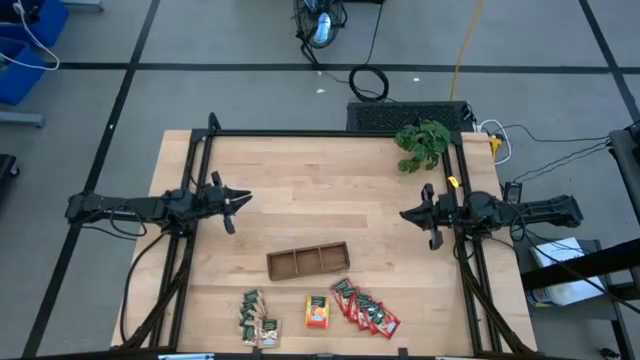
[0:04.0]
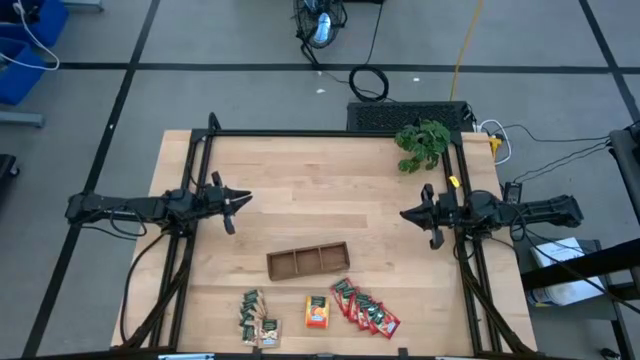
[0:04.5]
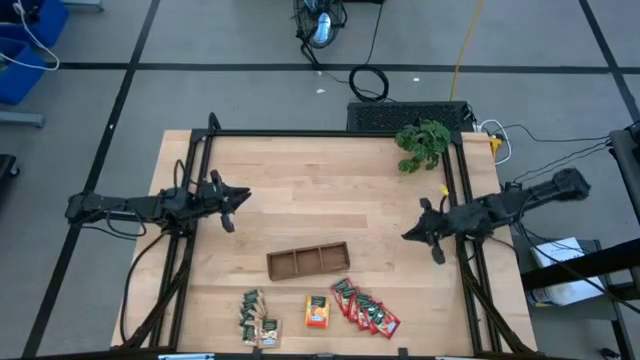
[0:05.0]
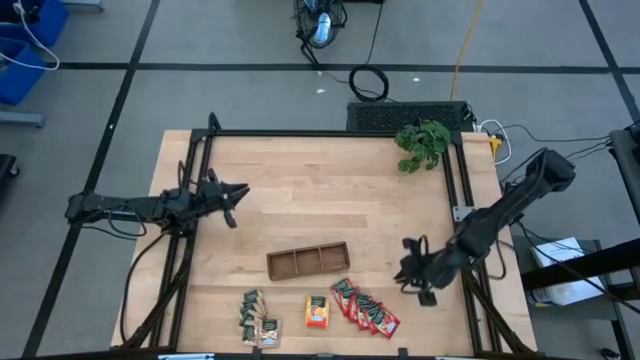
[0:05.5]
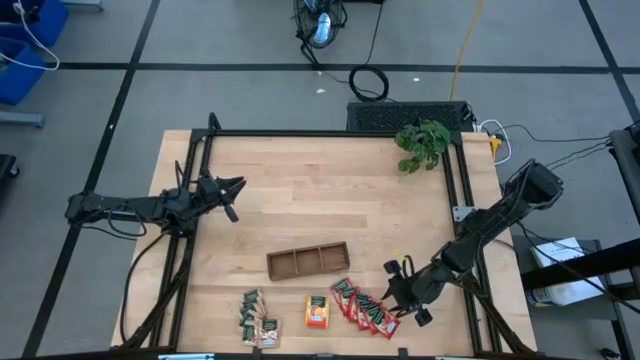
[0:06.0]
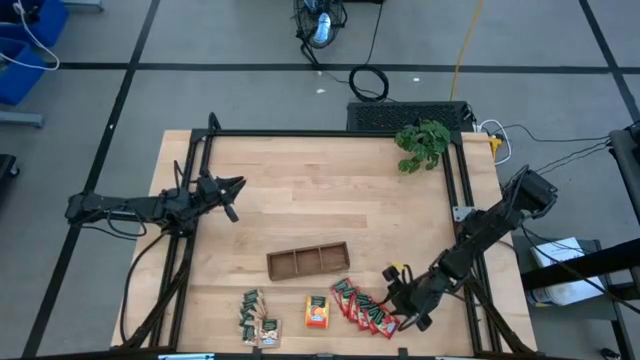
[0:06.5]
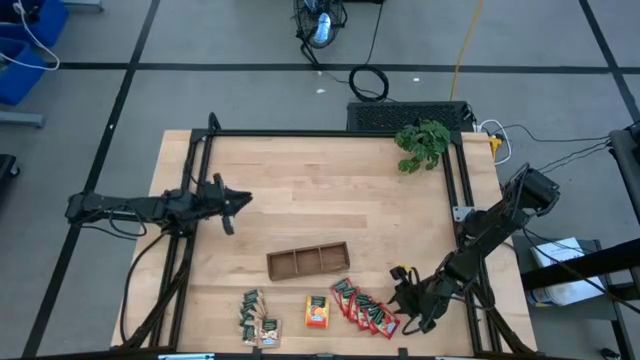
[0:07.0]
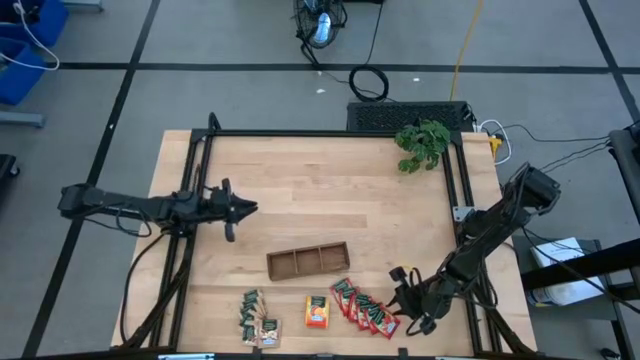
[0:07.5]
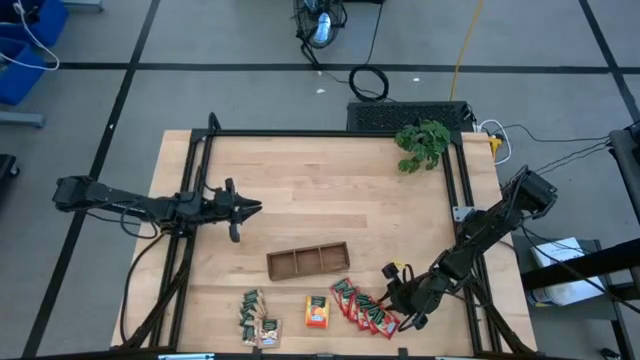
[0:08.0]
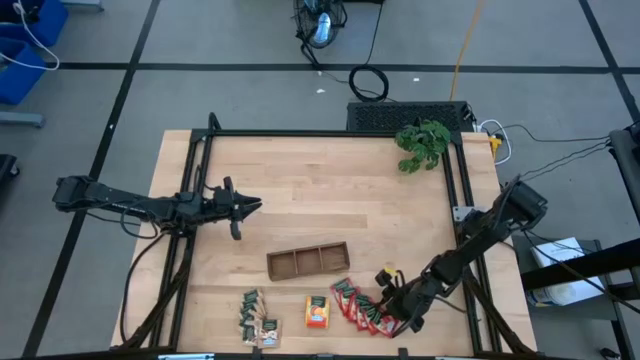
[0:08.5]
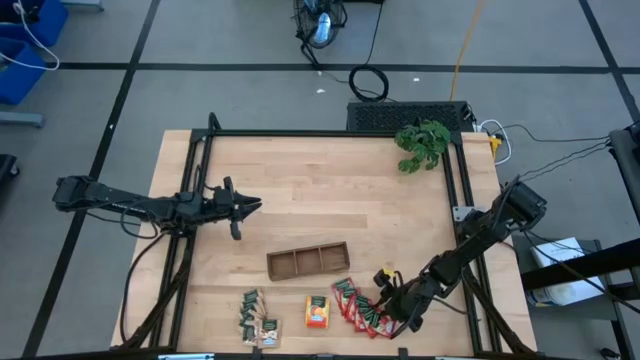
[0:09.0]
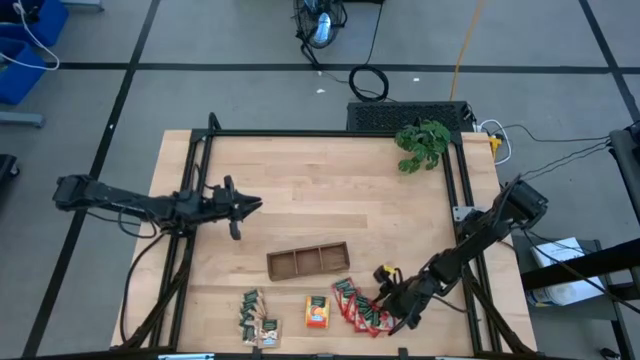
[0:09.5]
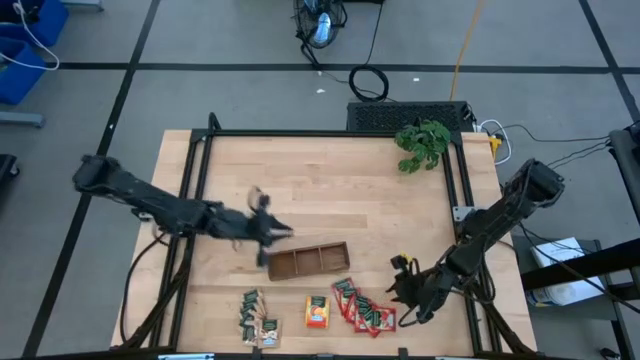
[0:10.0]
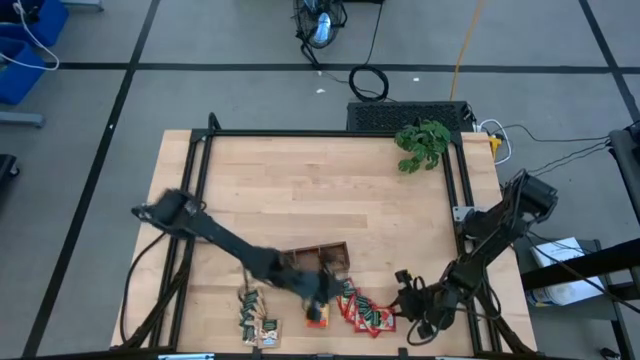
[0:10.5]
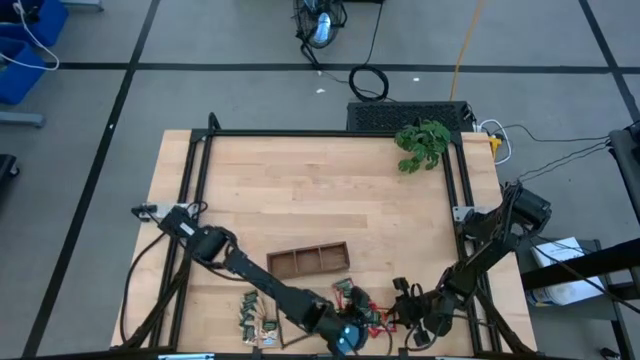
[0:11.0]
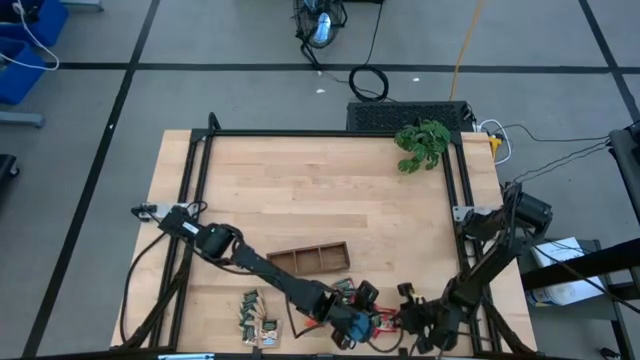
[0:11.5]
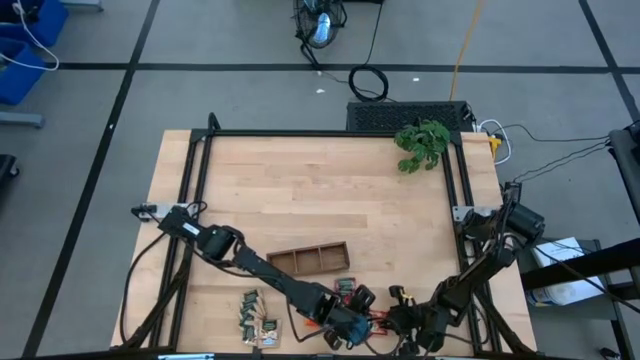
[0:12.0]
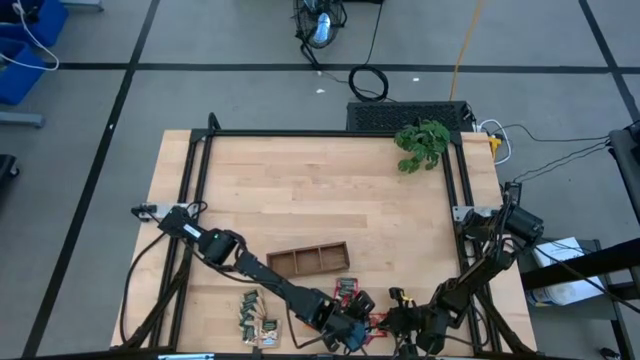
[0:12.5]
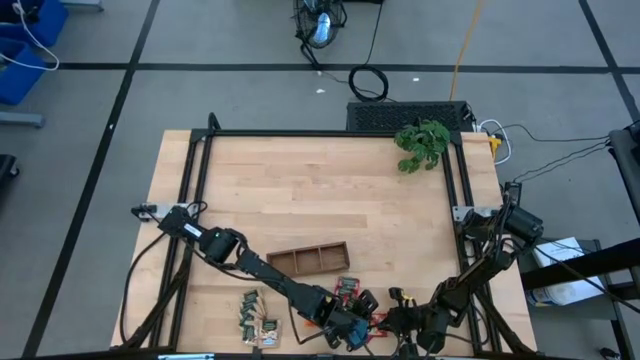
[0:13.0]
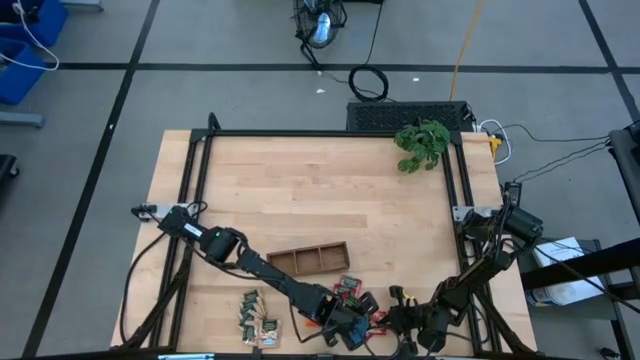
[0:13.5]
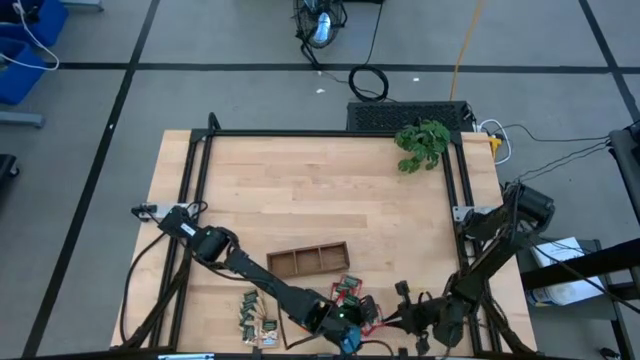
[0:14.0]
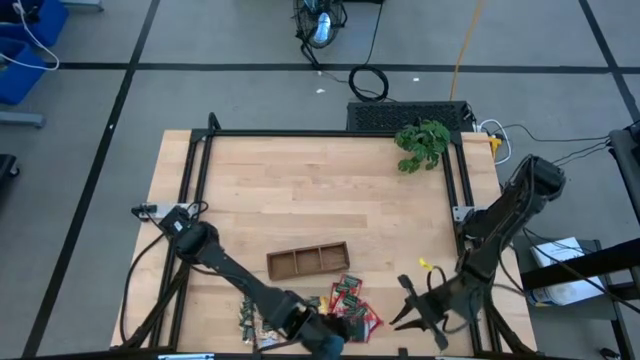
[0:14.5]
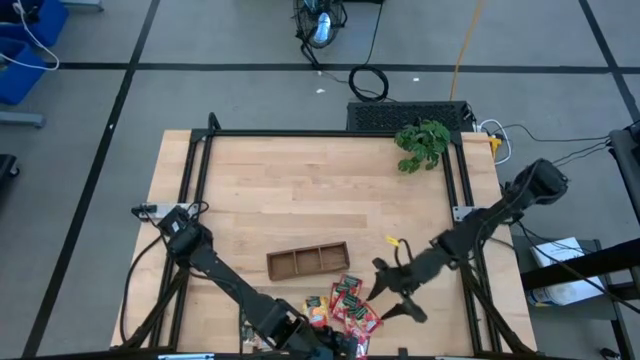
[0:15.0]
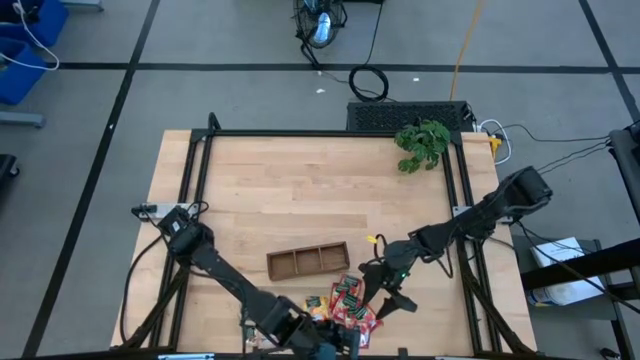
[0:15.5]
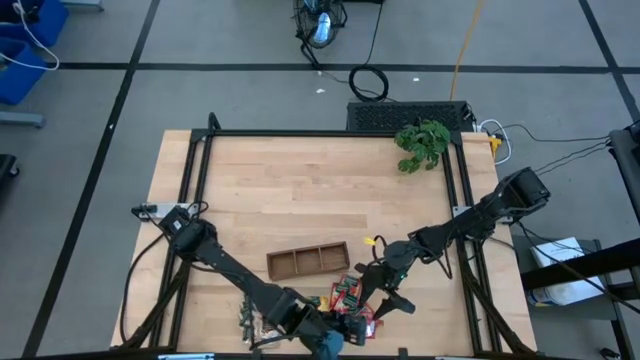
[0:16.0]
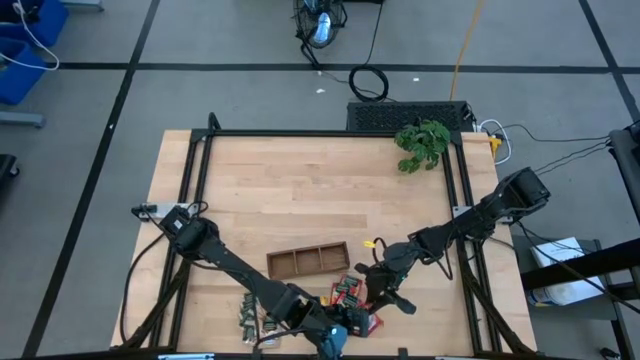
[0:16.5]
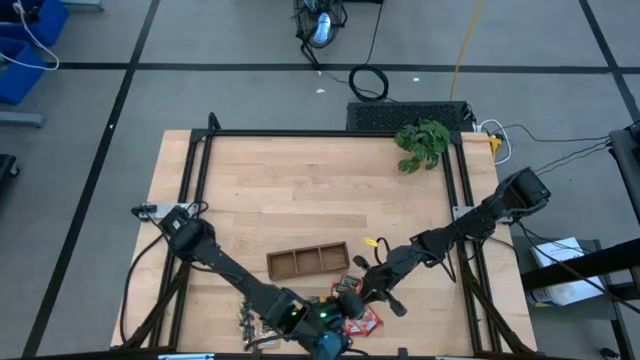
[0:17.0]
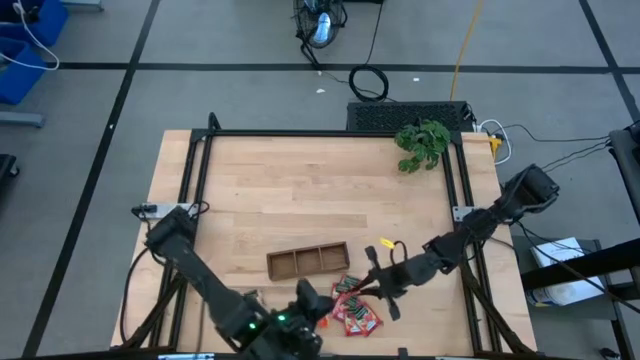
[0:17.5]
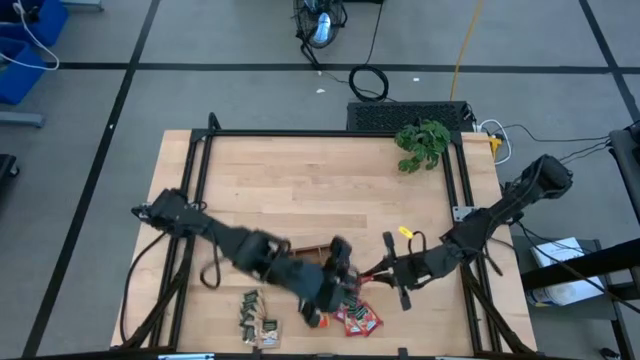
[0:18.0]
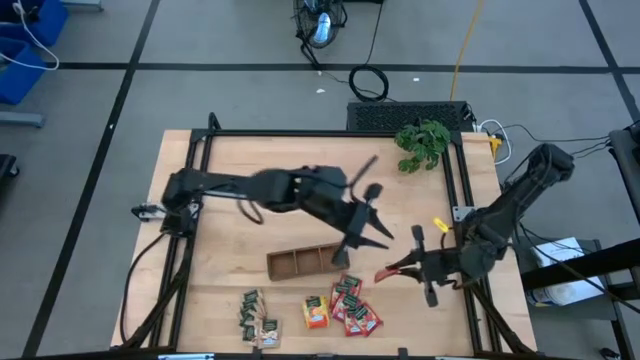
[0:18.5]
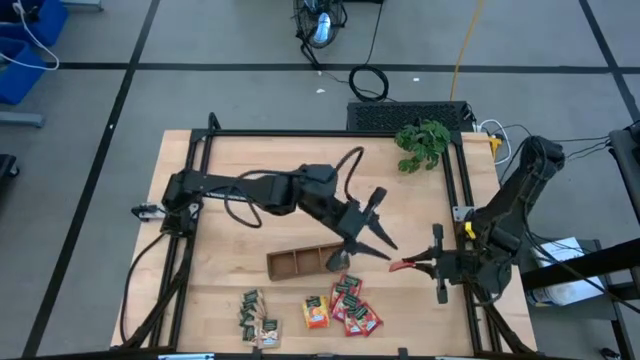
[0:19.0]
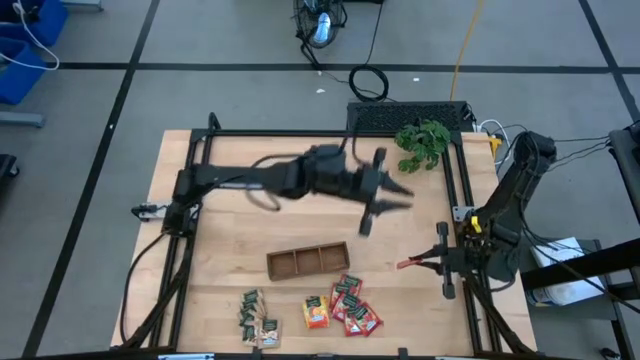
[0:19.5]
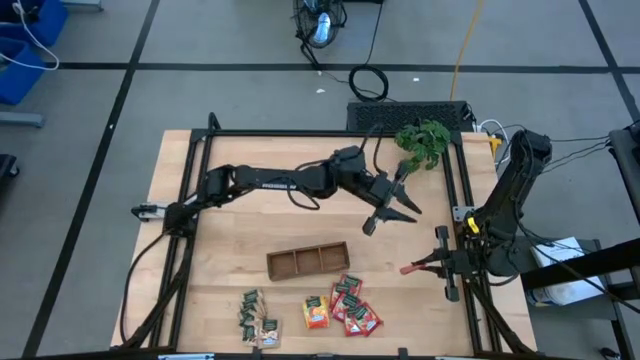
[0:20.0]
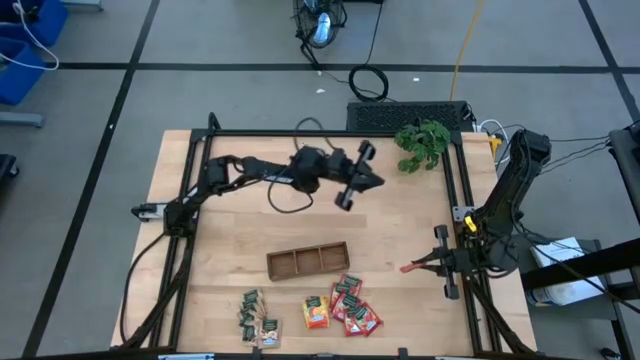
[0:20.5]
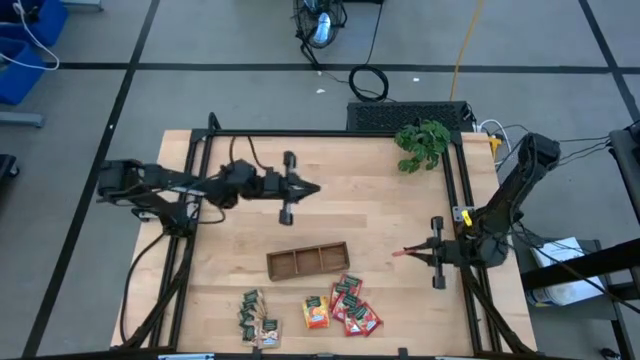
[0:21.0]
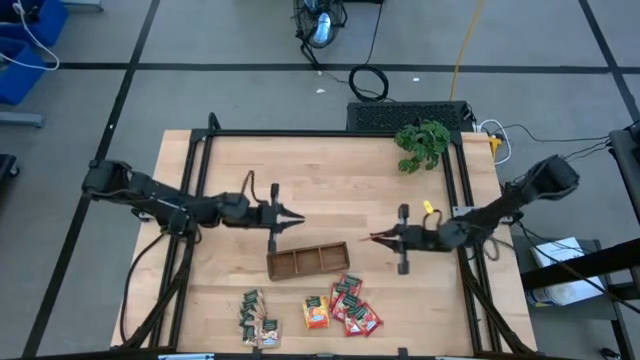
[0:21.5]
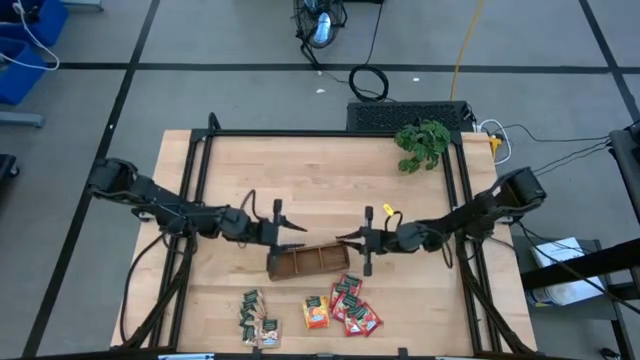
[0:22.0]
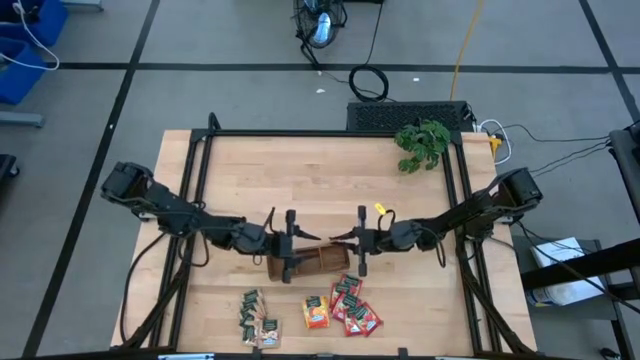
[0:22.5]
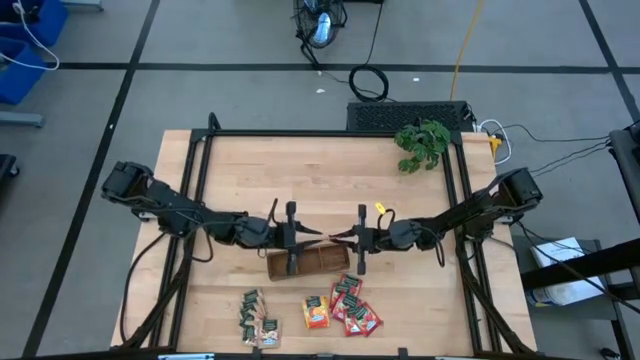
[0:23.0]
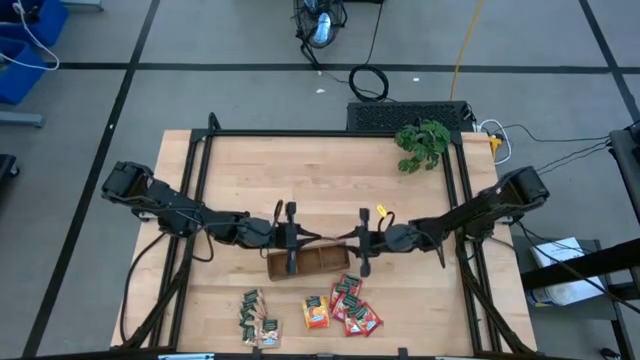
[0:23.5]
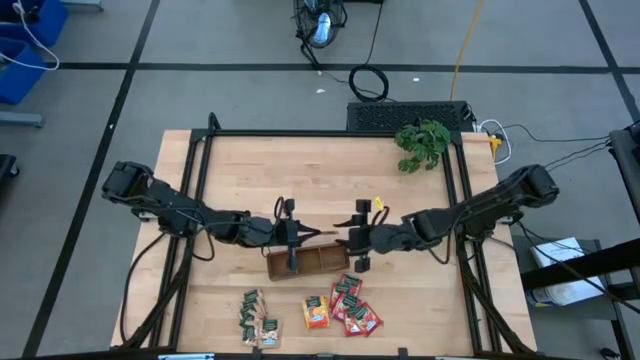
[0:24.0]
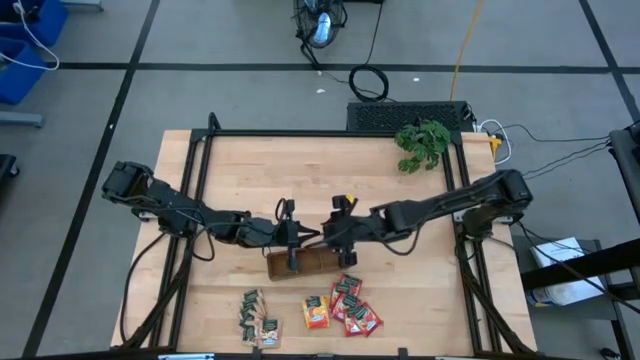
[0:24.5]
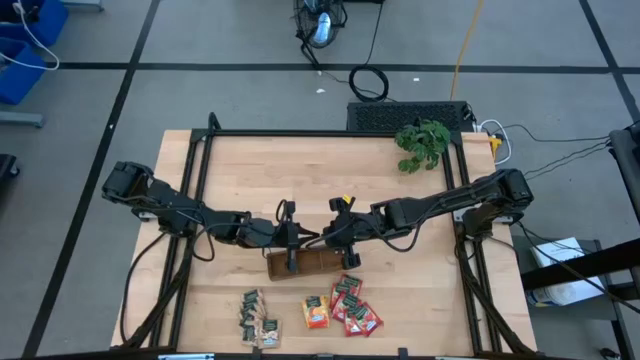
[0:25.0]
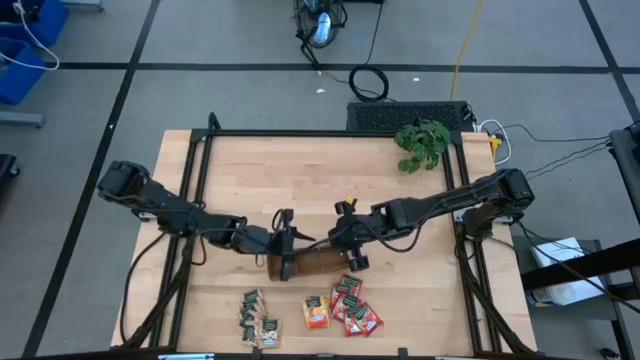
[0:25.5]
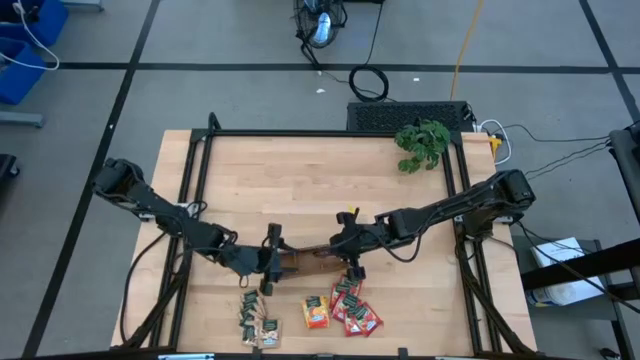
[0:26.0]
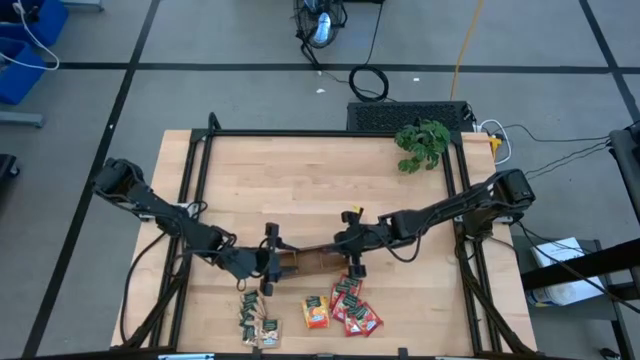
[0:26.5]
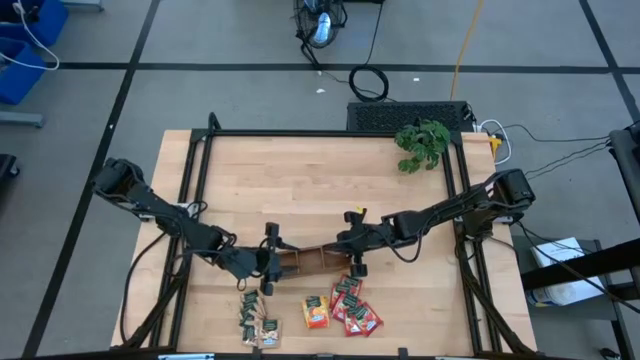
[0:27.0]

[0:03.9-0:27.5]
Task: Pick & Place Tea
Put the red tea bag into the right section of the wooden organizer
